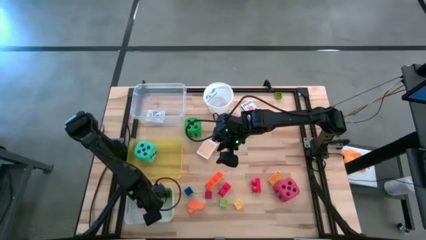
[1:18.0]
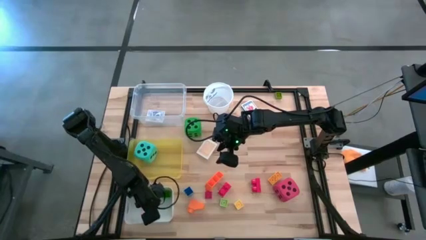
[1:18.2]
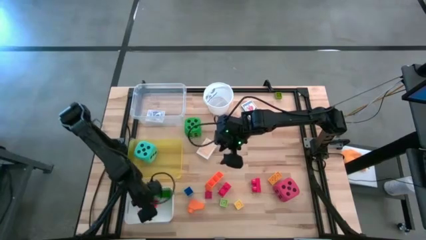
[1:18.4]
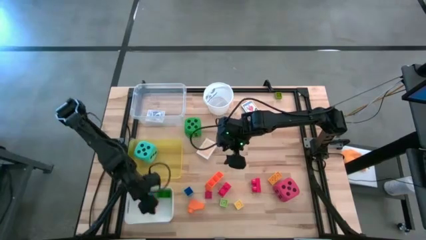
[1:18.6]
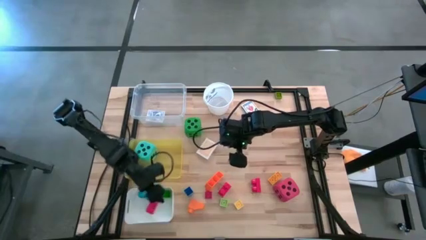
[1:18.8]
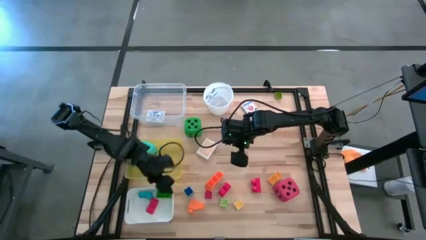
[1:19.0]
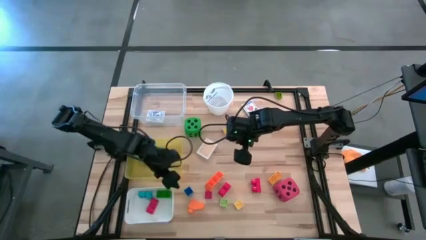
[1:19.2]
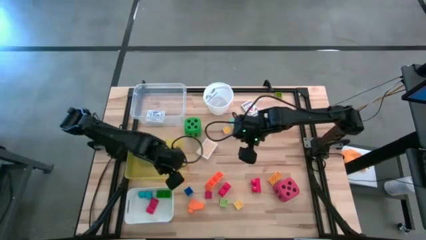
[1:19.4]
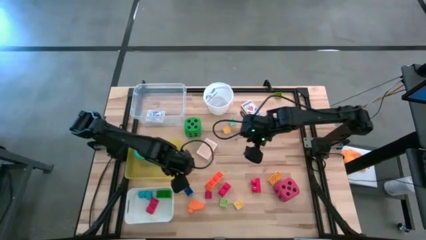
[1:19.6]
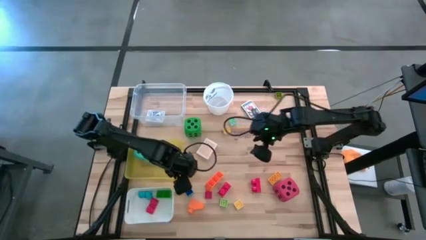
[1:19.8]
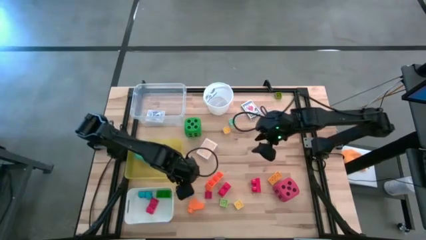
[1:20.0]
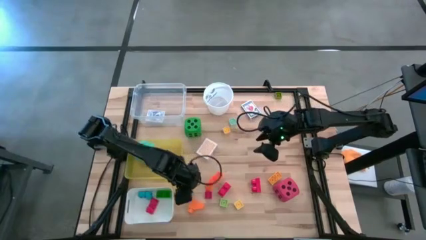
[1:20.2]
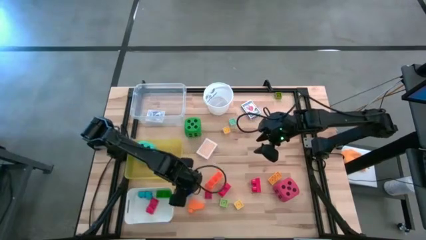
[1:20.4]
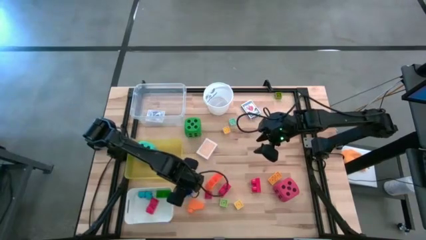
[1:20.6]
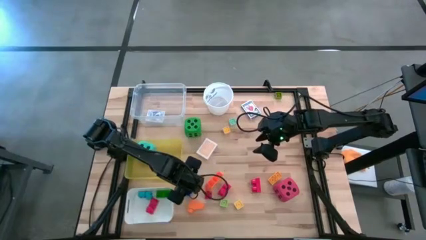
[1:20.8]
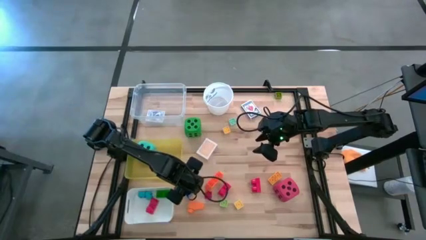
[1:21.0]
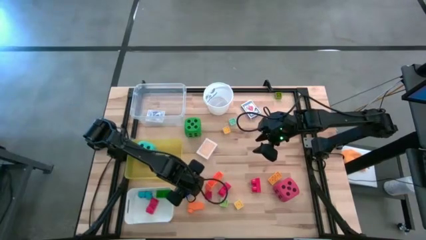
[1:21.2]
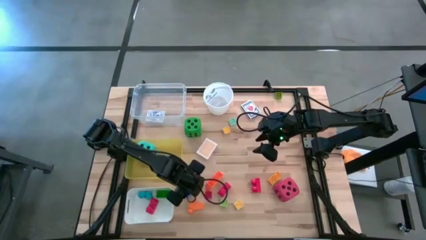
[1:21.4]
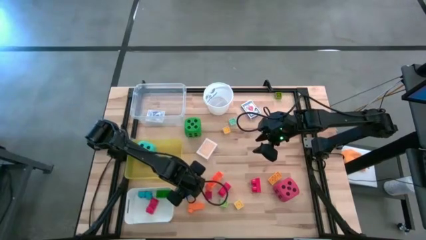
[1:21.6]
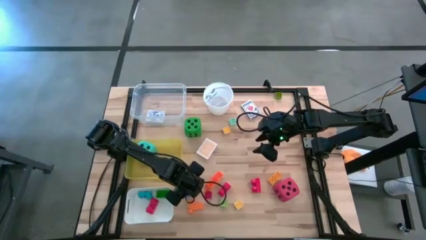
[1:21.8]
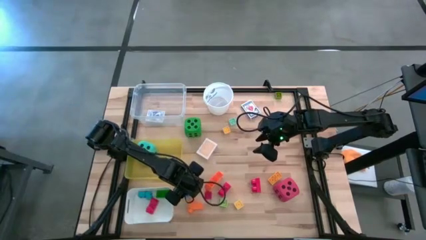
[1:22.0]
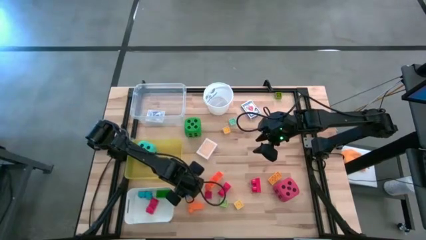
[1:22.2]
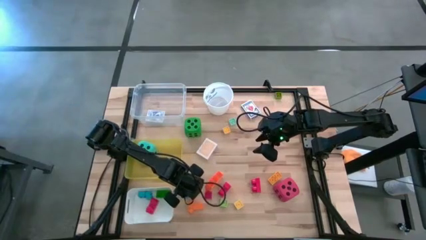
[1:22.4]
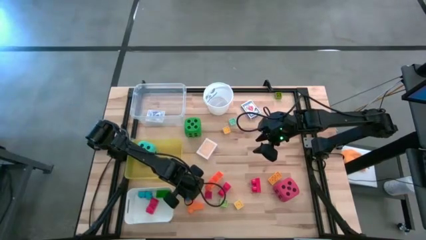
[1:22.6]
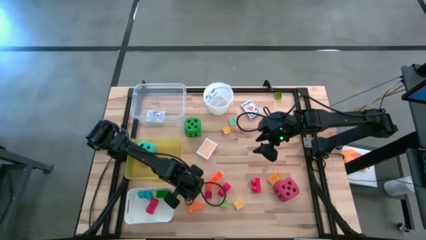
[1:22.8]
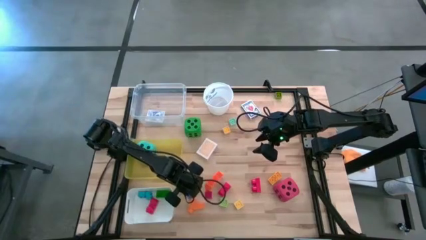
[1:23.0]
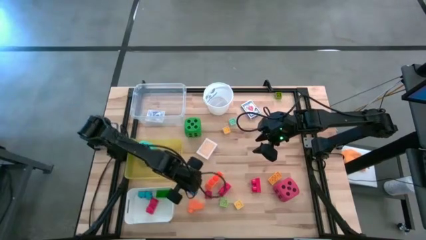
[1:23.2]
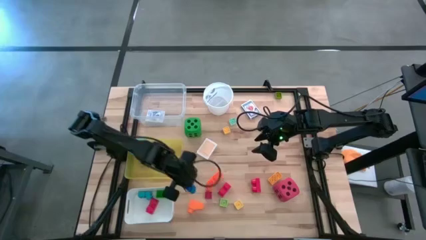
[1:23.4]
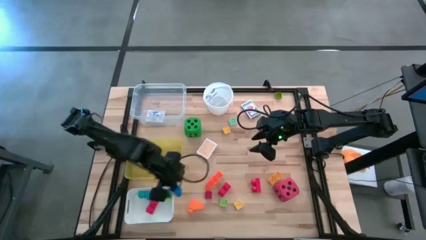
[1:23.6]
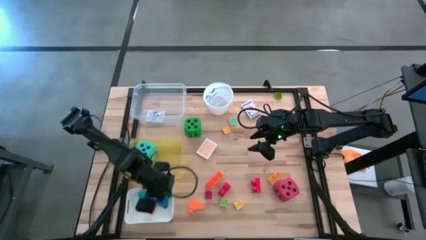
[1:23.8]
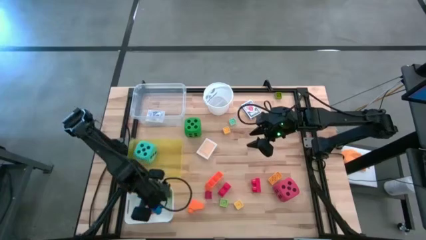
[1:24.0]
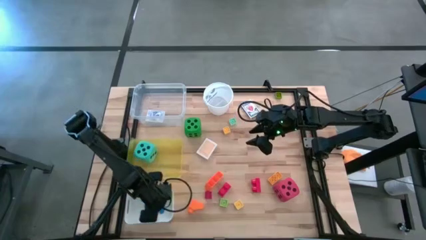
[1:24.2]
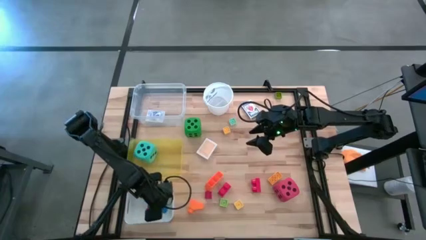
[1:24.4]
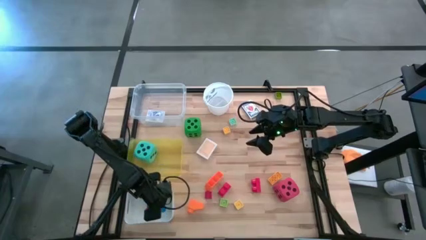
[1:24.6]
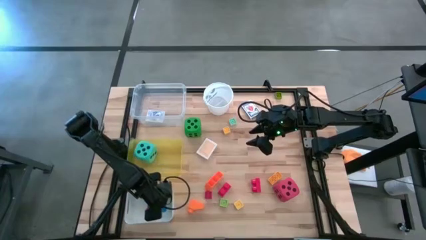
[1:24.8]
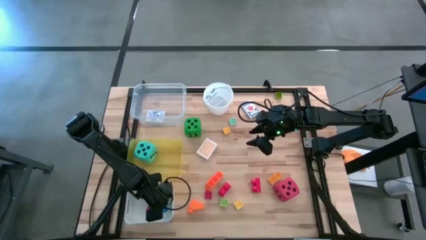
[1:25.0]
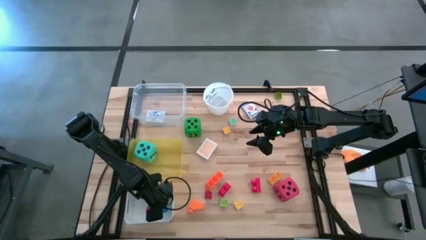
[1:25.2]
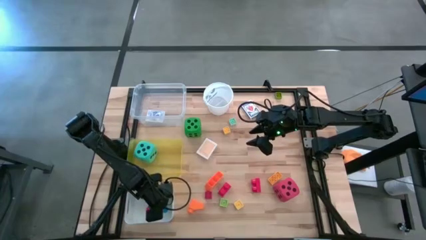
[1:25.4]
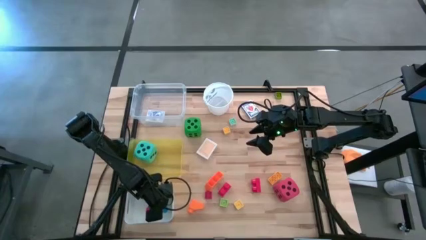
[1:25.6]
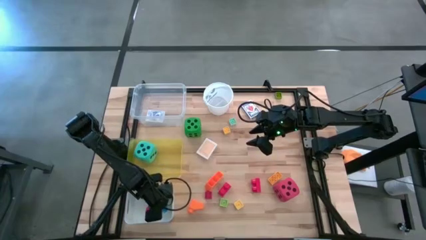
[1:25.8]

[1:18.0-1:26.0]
Task: Pick & Place Toys
Put the dark blue game piece into the white bin

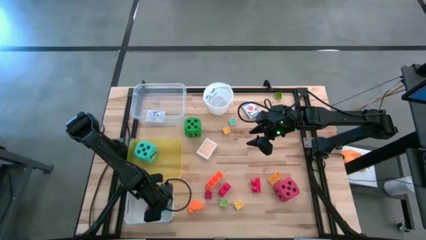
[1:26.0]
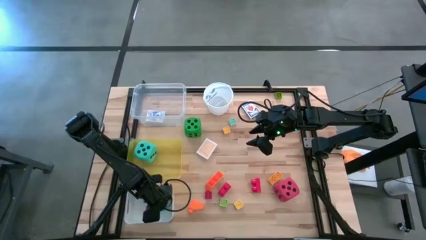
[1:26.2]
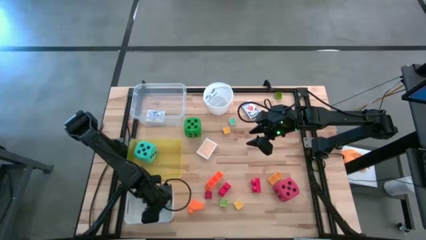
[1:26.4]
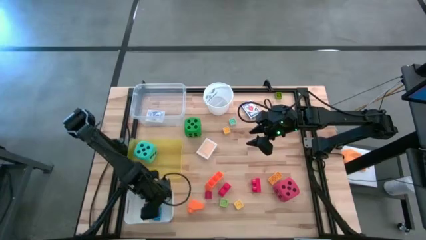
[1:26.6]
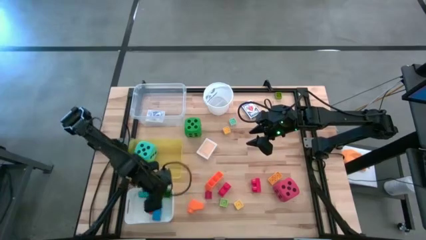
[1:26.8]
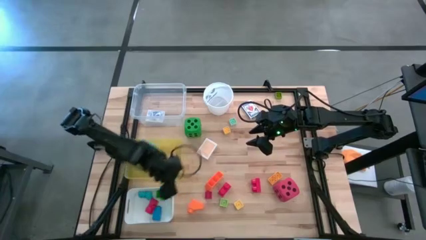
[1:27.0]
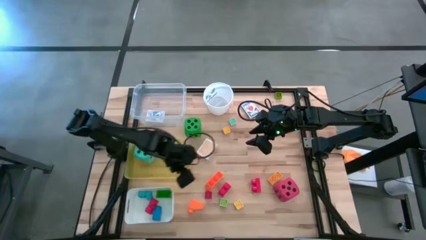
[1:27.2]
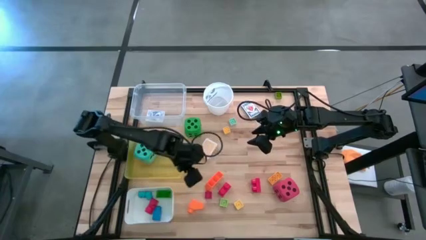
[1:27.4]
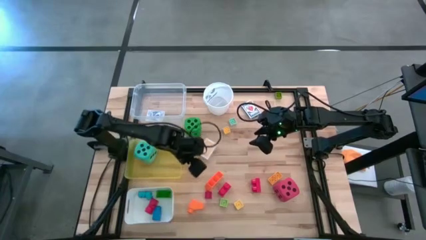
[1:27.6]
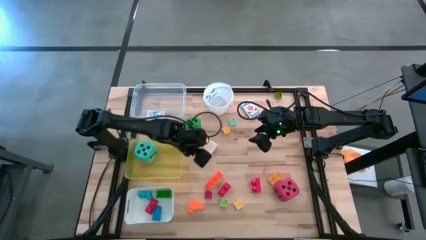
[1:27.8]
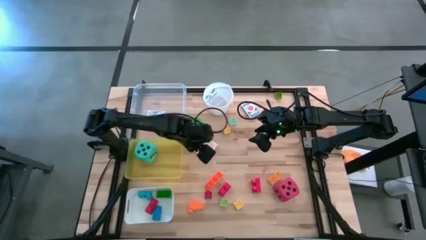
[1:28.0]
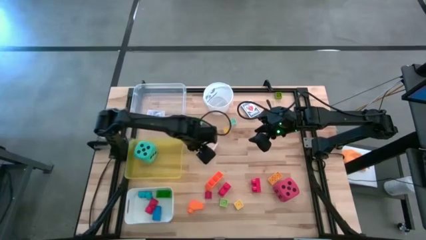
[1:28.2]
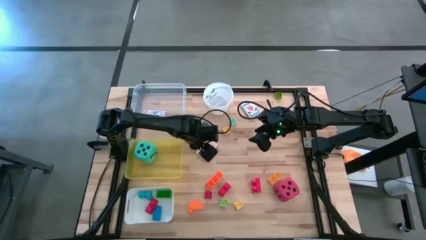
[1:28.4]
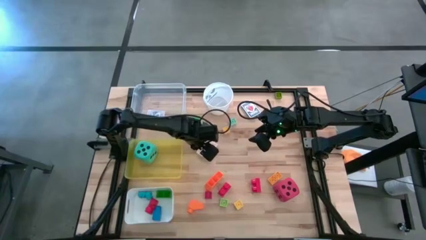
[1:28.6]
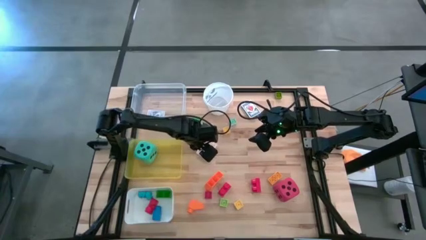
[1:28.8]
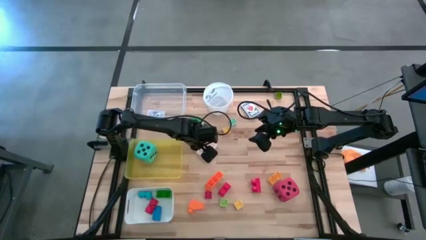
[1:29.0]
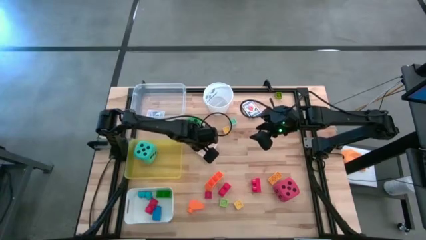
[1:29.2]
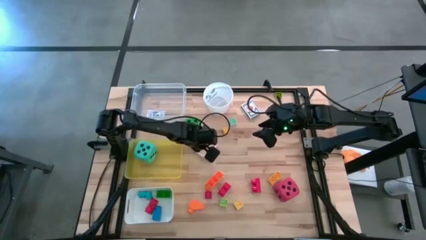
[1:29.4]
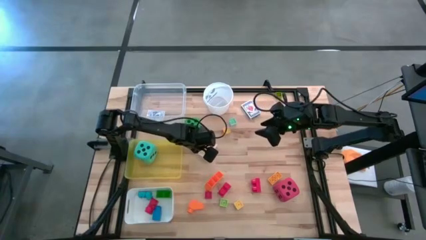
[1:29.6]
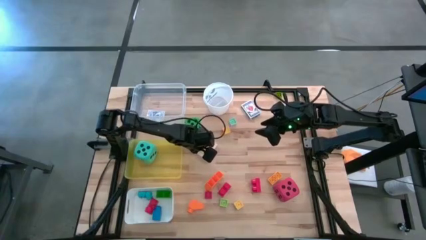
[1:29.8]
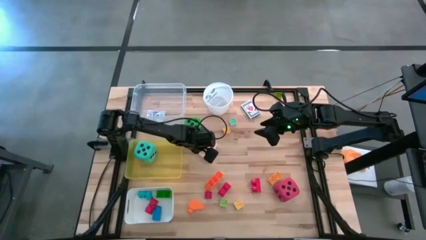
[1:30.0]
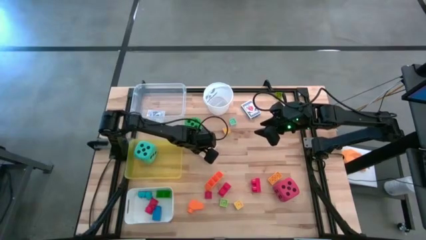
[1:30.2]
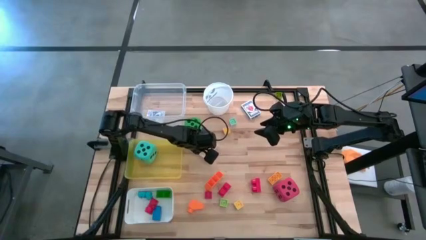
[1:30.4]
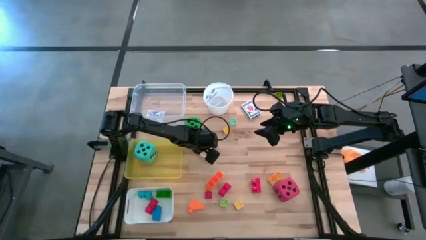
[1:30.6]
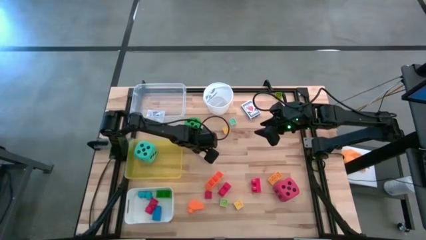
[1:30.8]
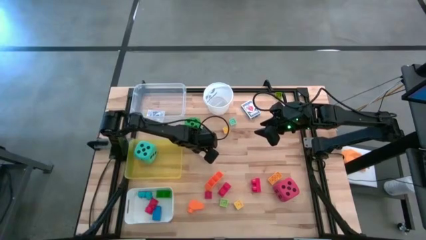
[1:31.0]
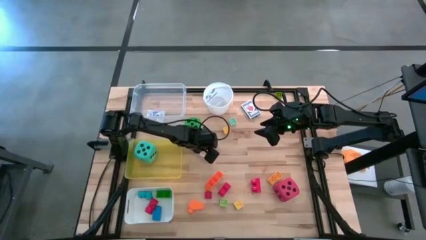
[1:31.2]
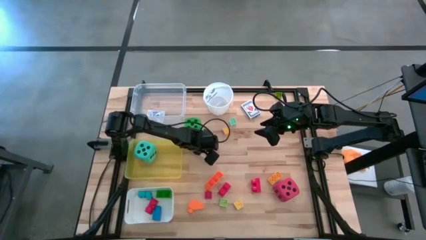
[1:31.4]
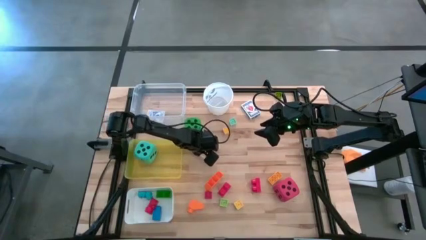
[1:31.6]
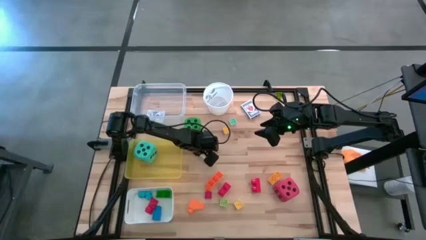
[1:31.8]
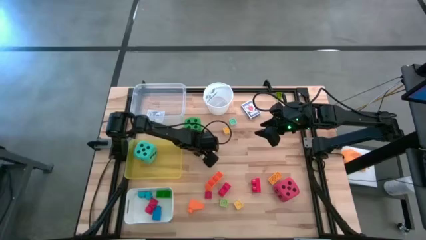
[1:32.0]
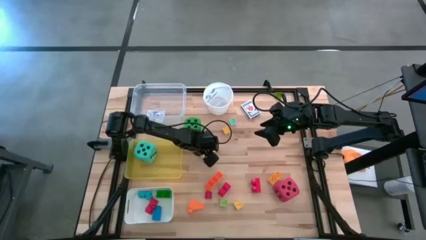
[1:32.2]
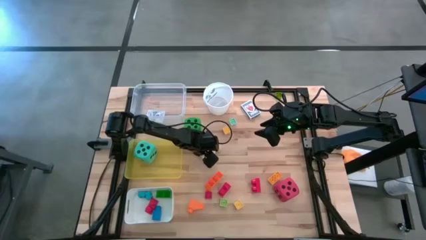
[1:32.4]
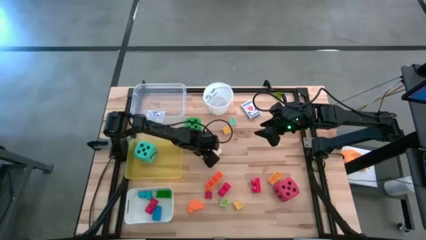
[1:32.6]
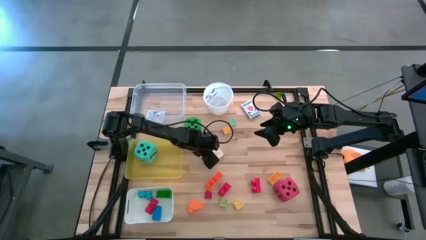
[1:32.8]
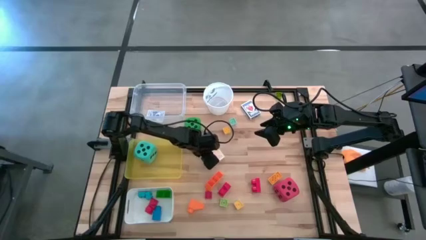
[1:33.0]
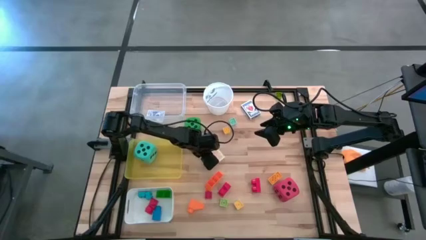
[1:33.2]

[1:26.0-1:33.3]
Put the yellow deck of cards into the transparent bin
